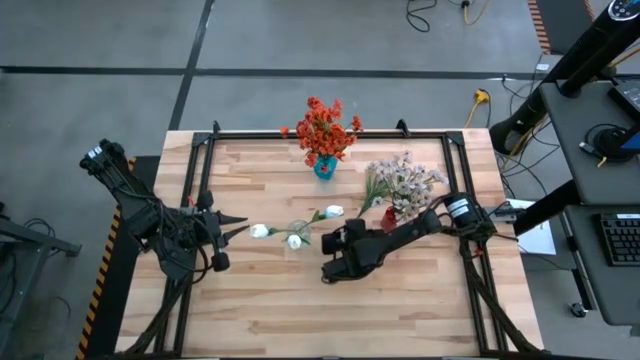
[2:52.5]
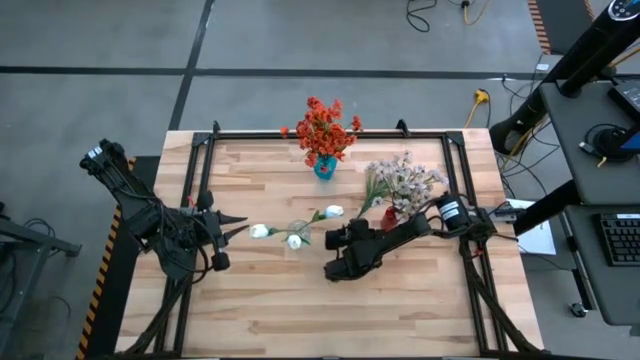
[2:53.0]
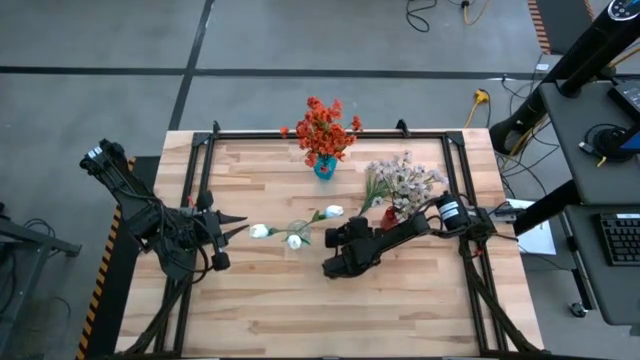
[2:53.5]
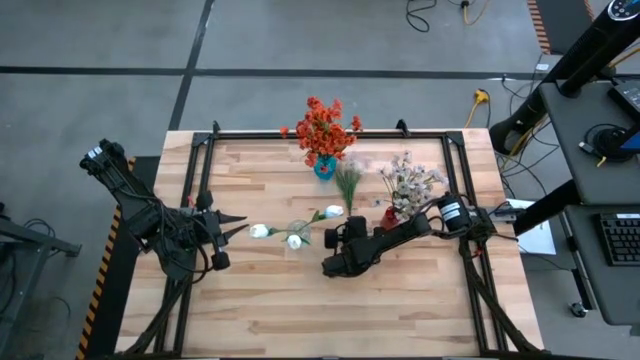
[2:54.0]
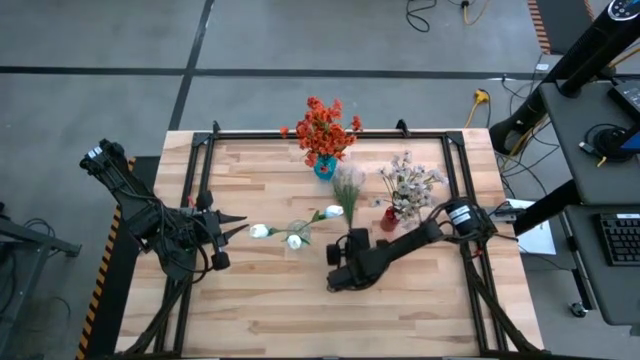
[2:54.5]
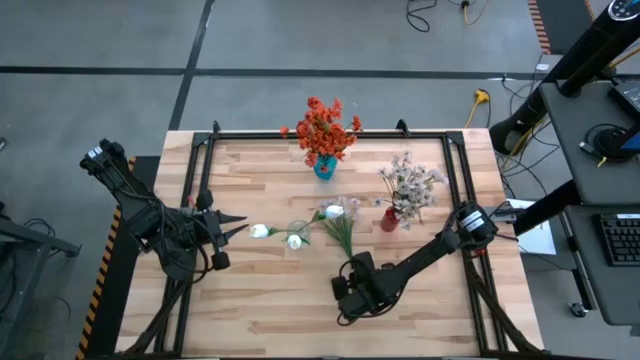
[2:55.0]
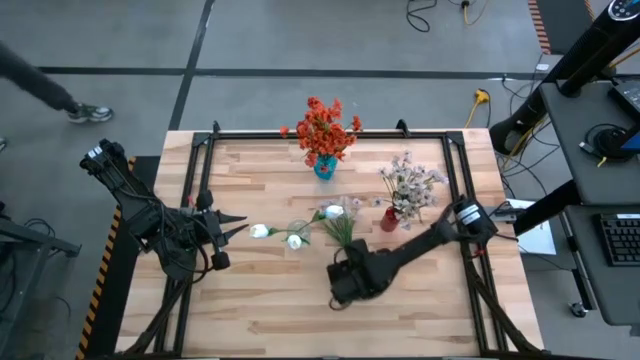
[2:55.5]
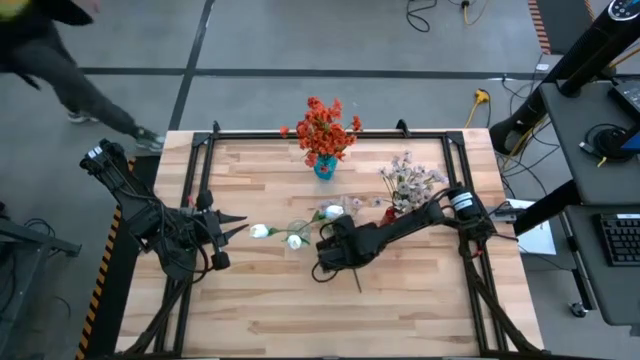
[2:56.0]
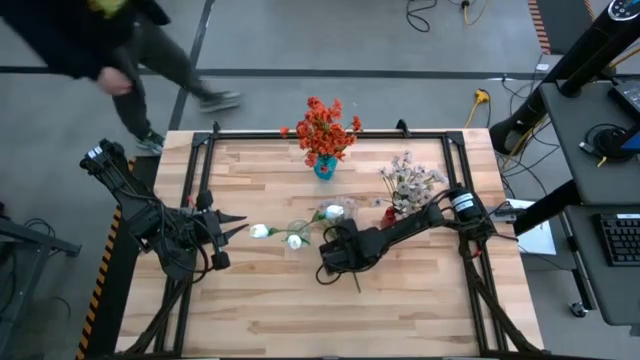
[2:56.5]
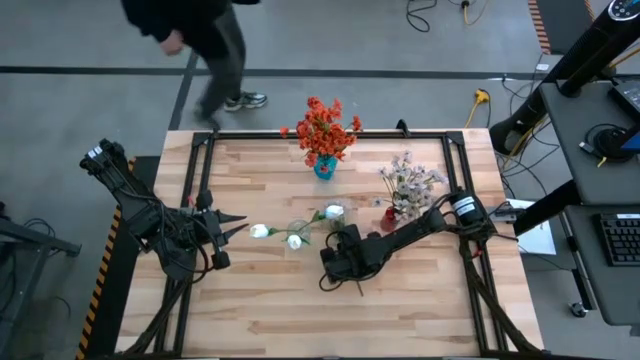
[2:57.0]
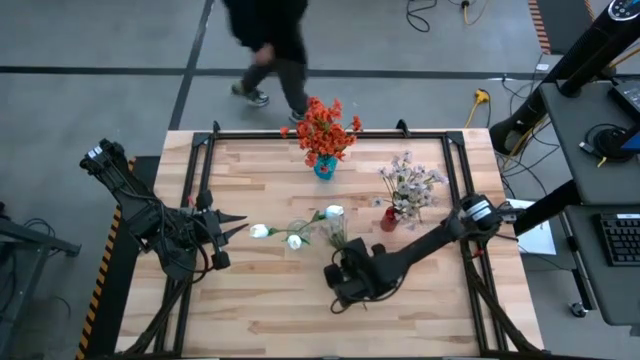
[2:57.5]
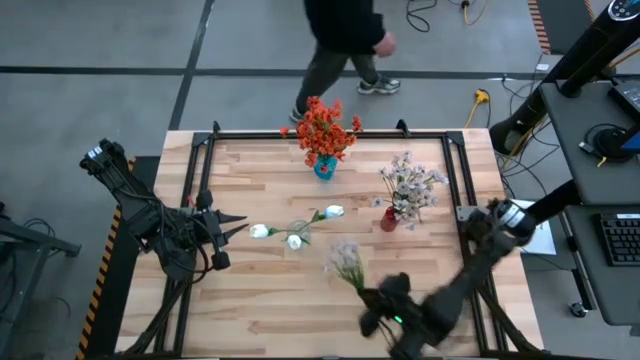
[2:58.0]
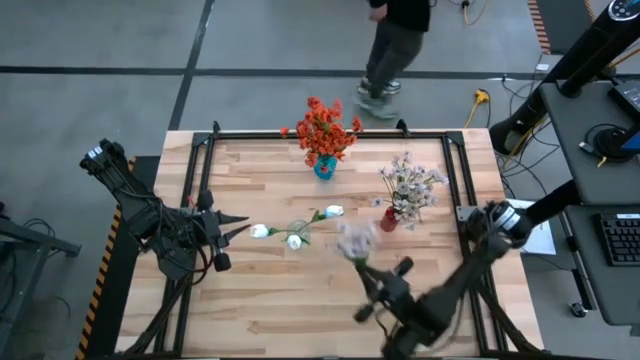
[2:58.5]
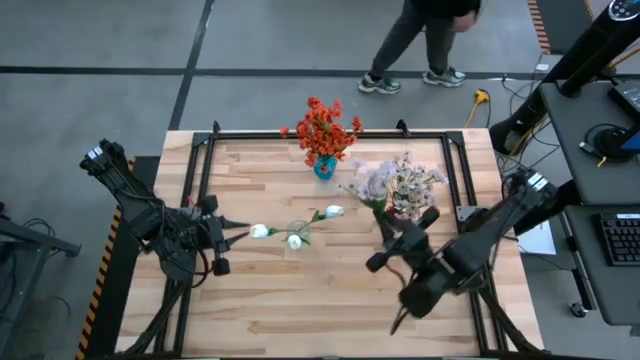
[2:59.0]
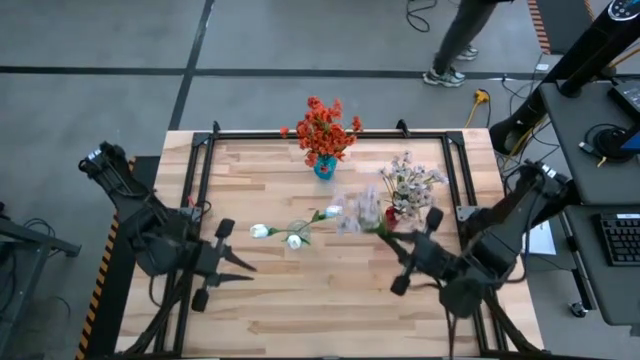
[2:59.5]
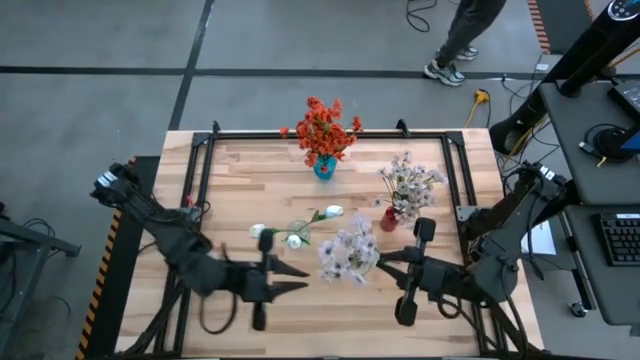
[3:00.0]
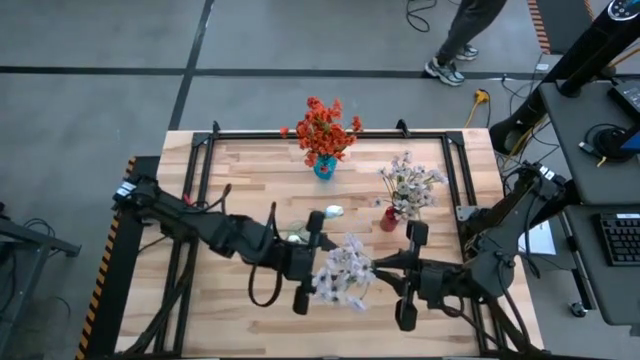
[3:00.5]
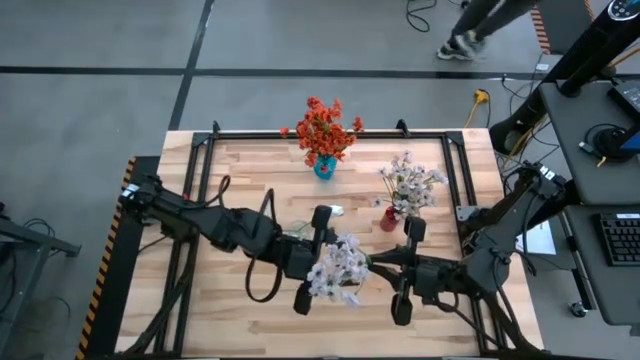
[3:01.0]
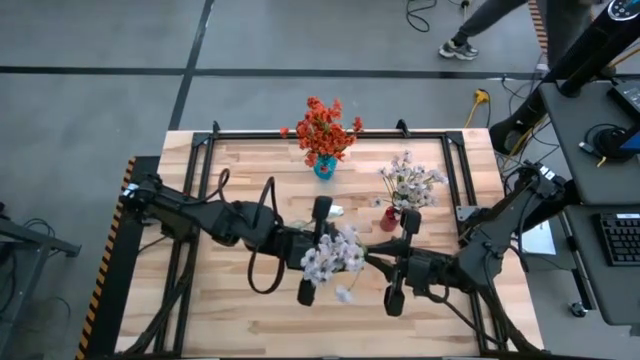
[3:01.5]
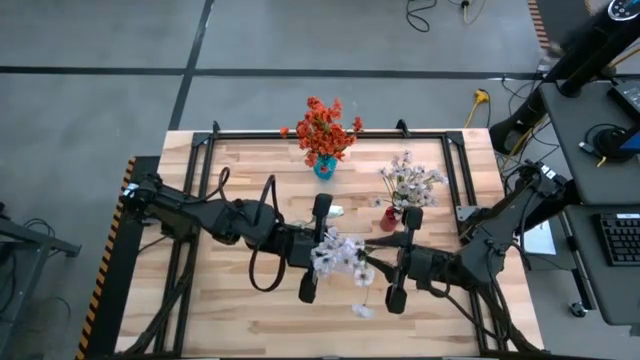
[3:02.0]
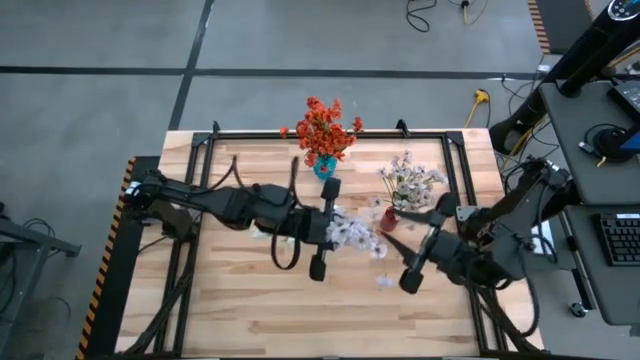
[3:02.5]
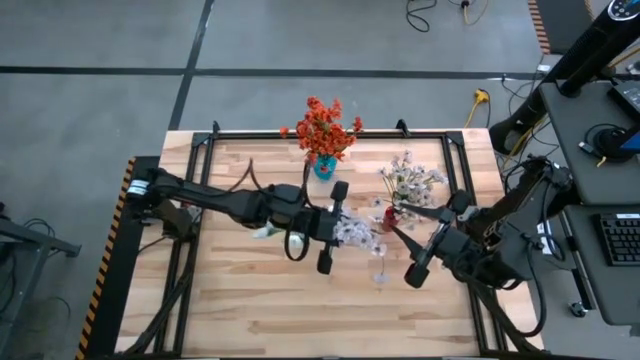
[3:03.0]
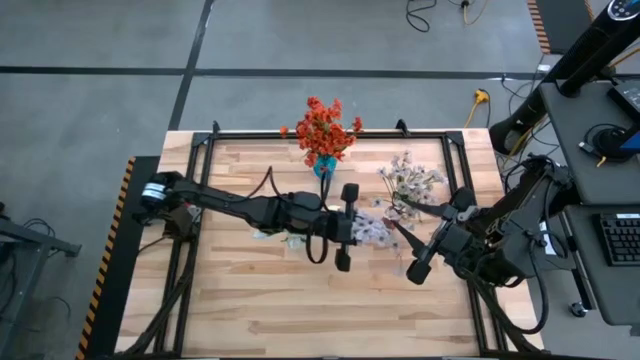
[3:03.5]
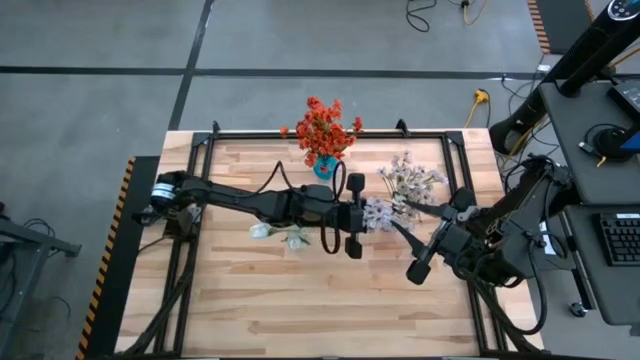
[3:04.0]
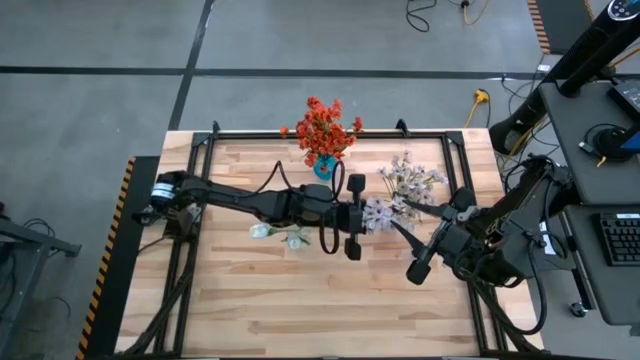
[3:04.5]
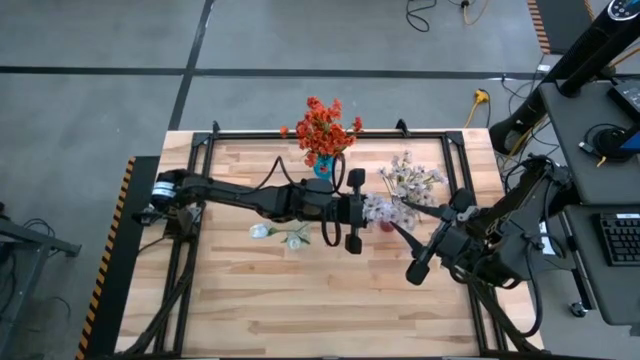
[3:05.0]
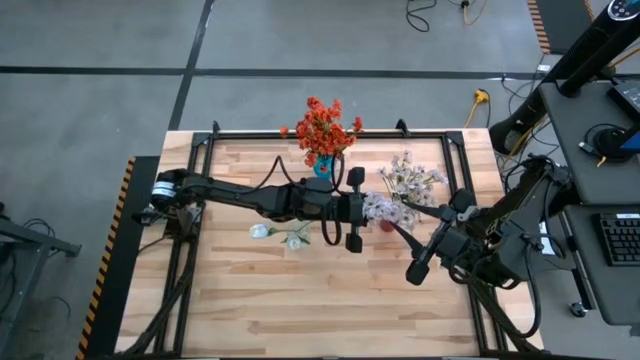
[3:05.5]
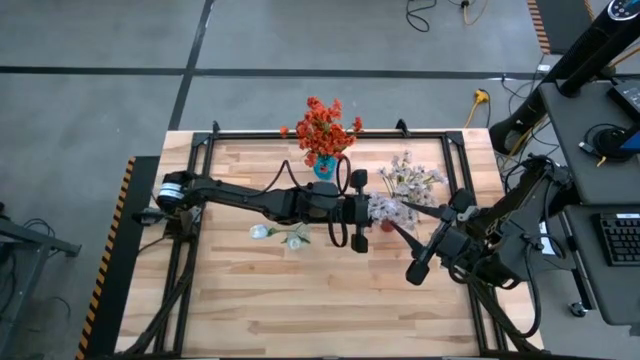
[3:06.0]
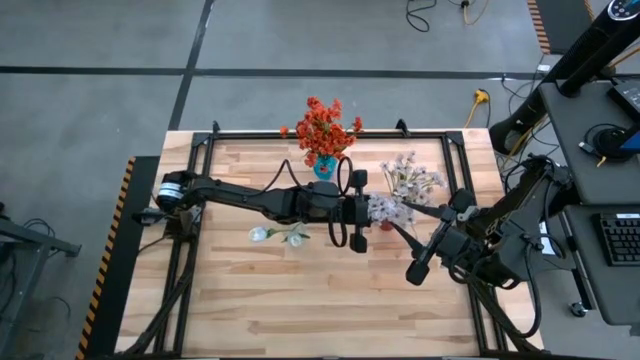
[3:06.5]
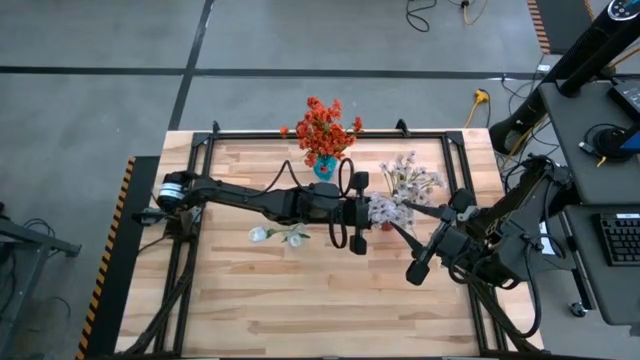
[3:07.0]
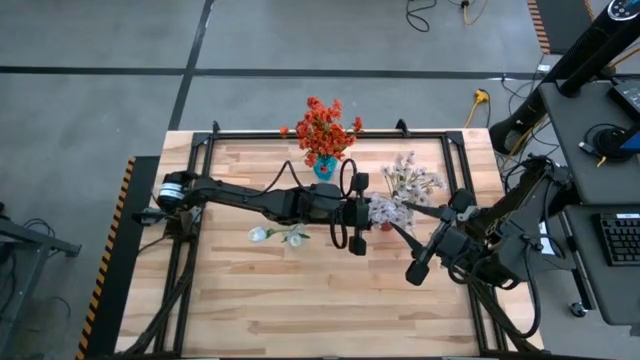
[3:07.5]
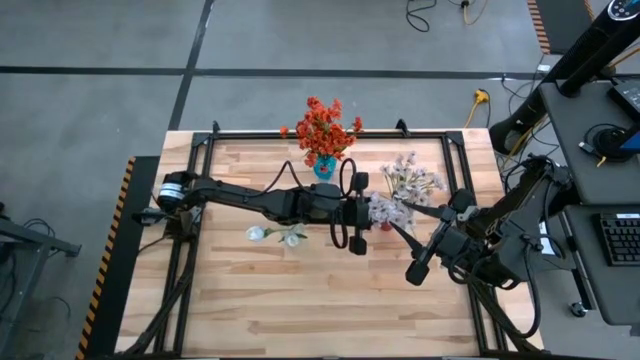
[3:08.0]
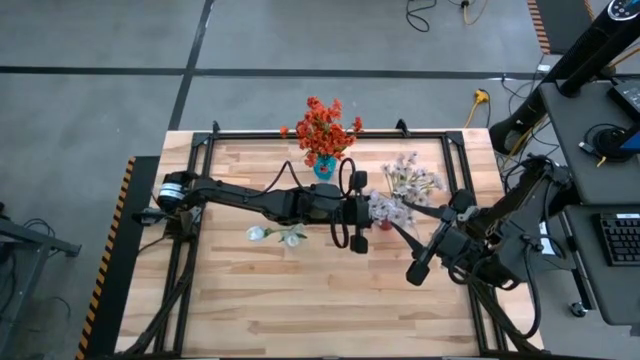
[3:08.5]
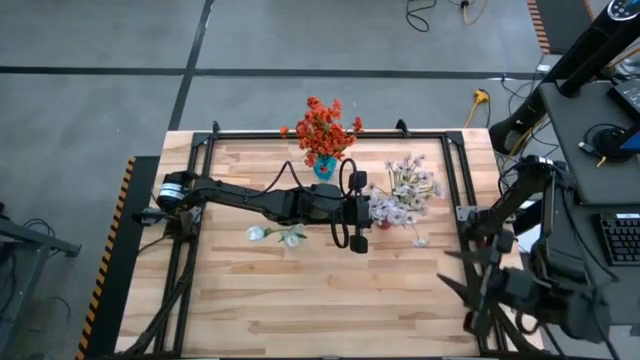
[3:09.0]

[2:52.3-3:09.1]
Task: Sort flowers into vase by color
Put the white flowers into the red vase

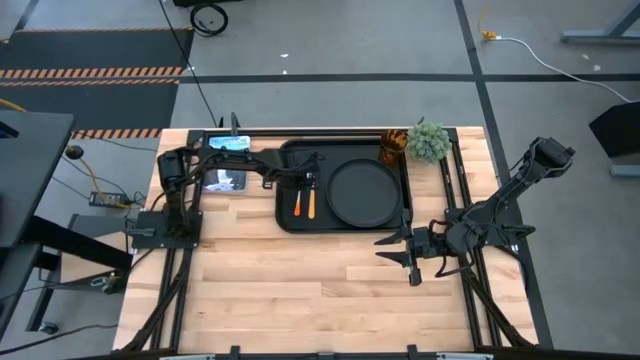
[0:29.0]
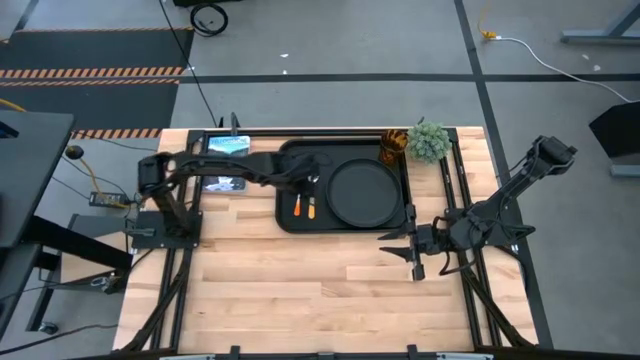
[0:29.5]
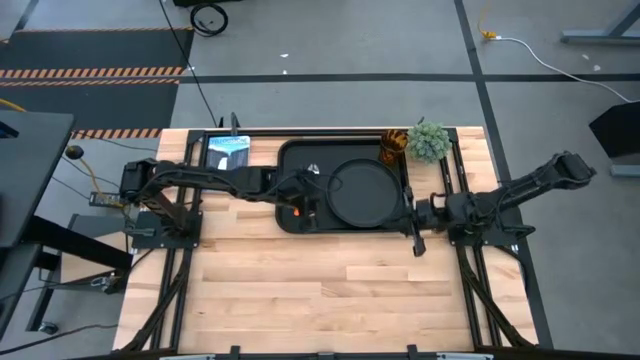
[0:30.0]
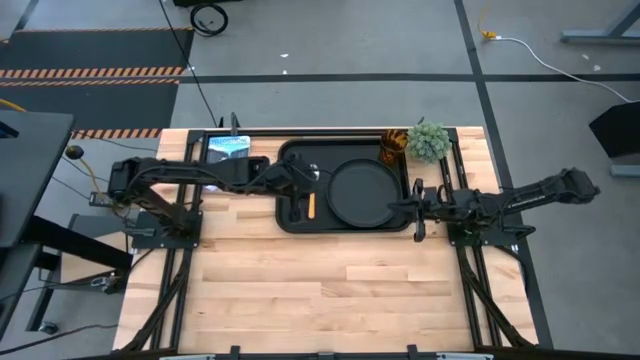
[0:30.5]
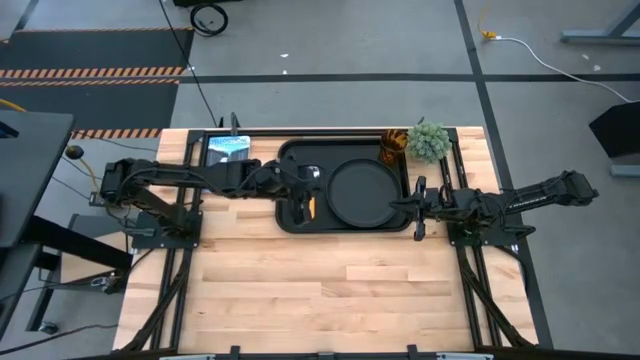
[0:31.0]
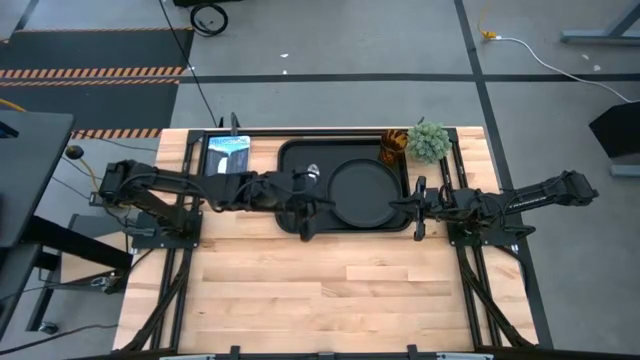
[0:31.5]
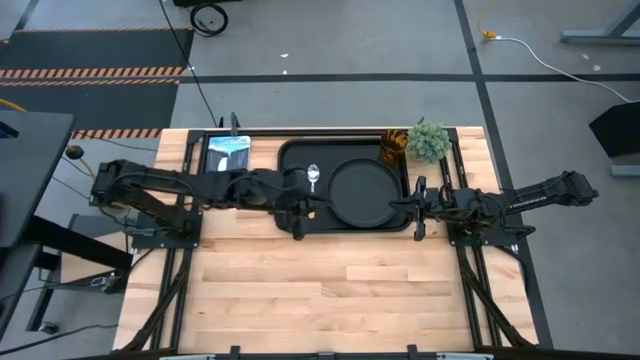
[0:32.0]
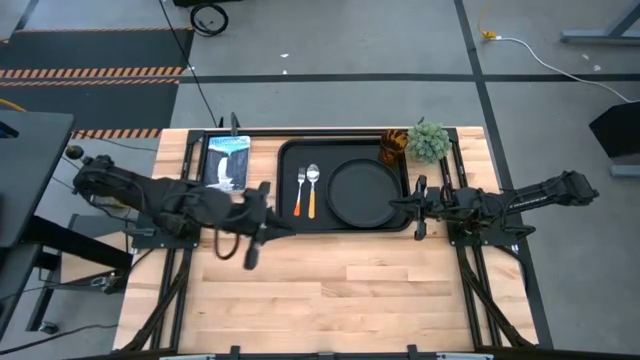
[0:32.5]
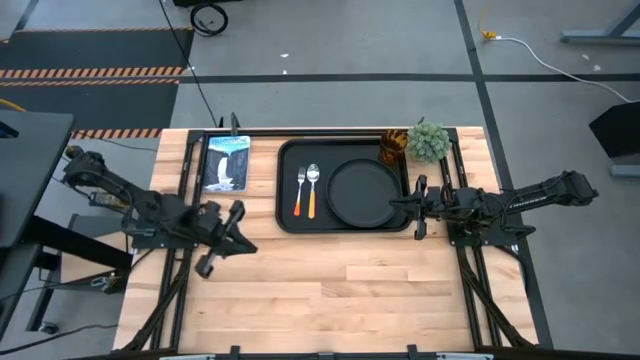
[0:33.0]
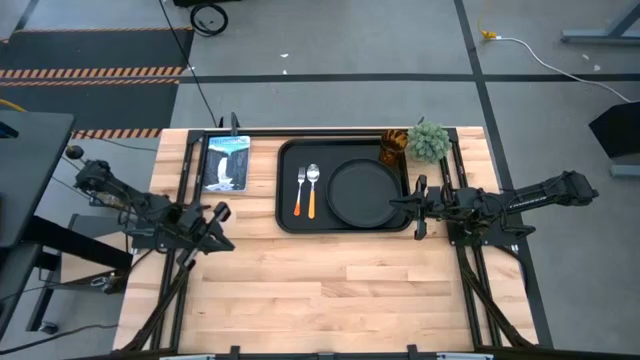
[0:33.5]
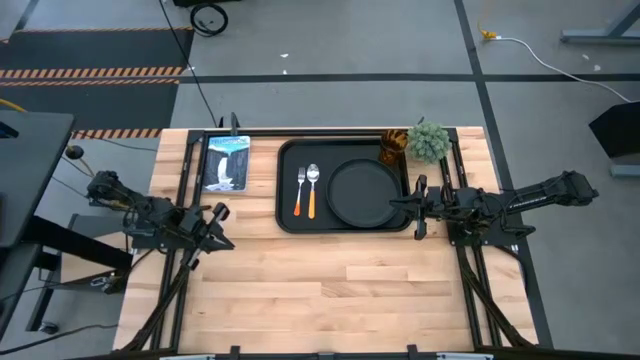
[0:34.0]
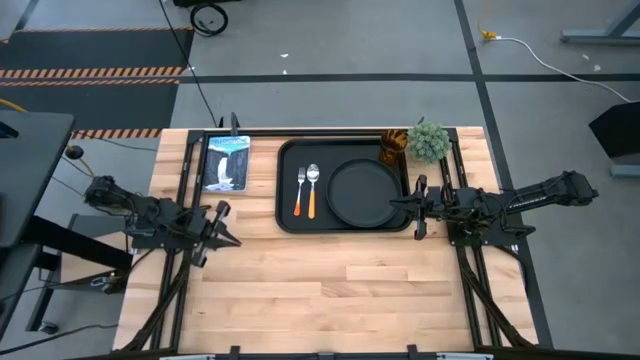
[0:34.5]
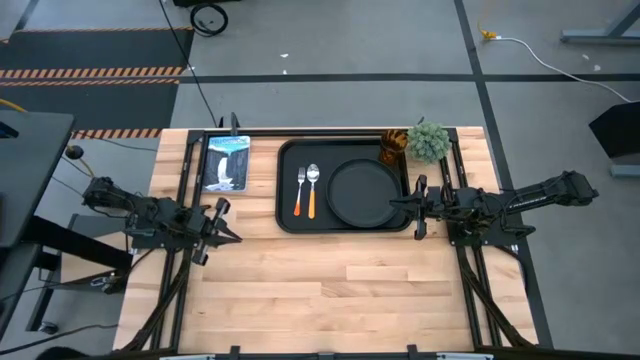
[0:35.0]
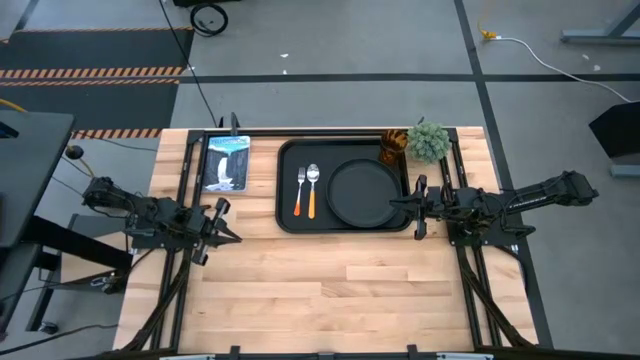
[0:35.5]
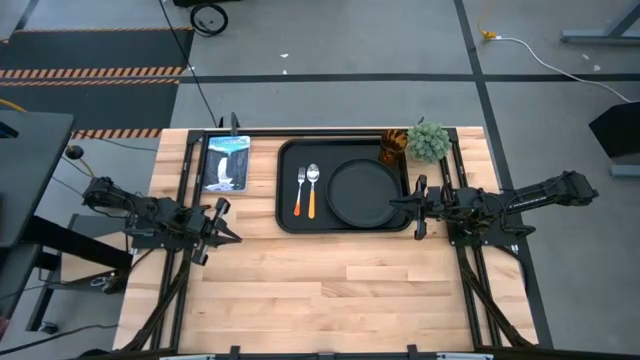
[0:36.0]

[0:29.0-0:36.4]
Task: Pick and place plate/cup/fork/spoon on tray
Return to Home Position
